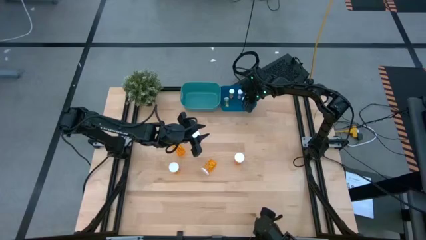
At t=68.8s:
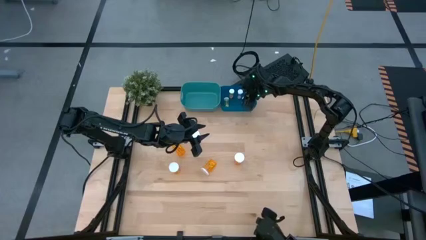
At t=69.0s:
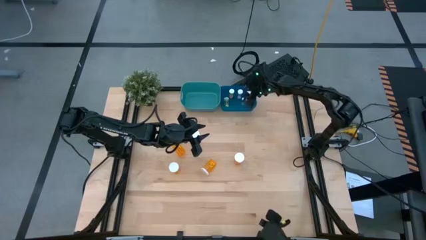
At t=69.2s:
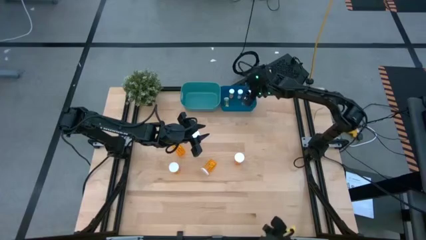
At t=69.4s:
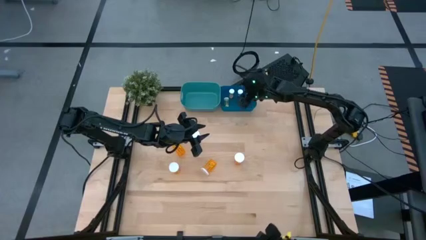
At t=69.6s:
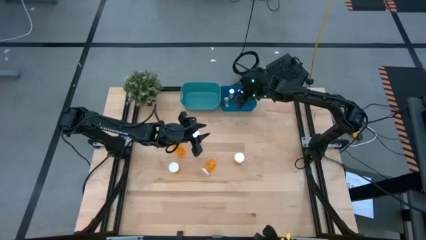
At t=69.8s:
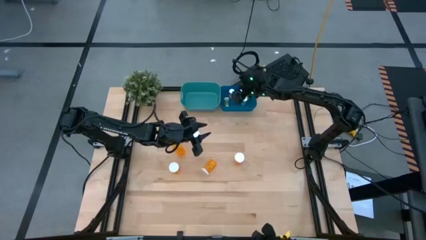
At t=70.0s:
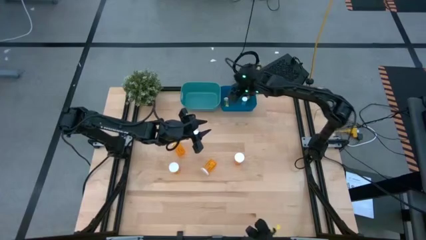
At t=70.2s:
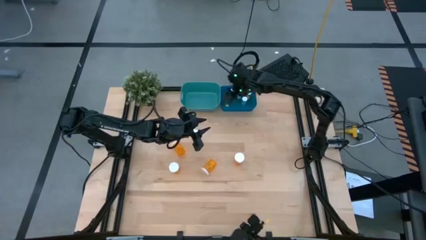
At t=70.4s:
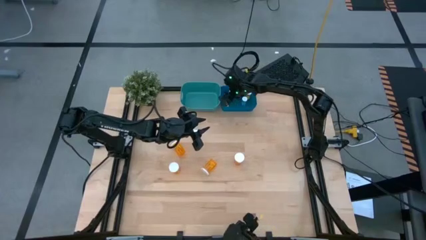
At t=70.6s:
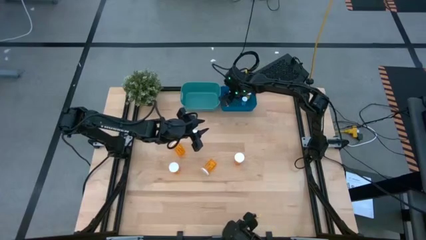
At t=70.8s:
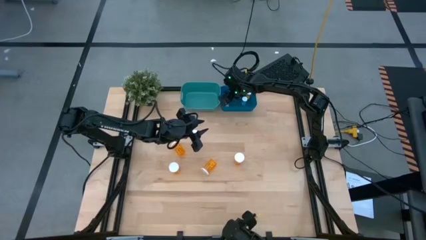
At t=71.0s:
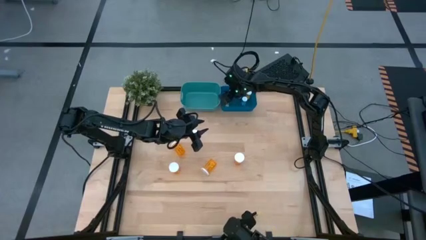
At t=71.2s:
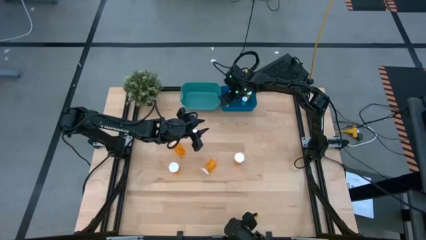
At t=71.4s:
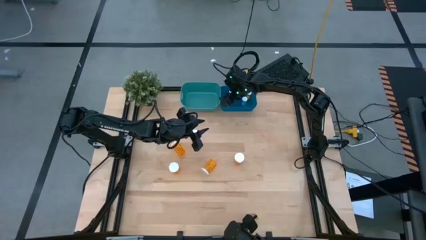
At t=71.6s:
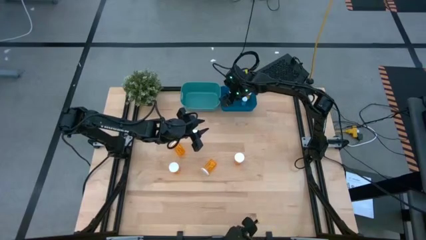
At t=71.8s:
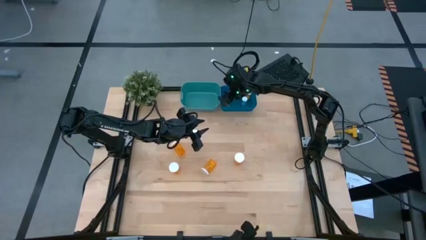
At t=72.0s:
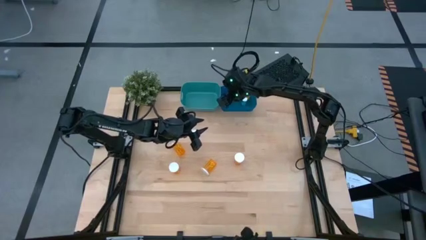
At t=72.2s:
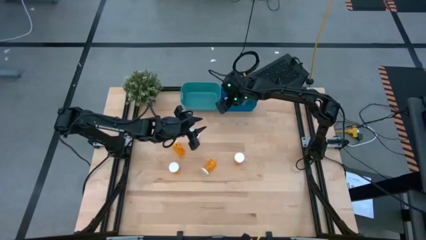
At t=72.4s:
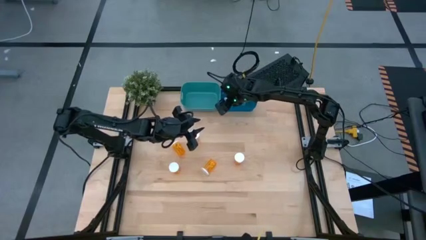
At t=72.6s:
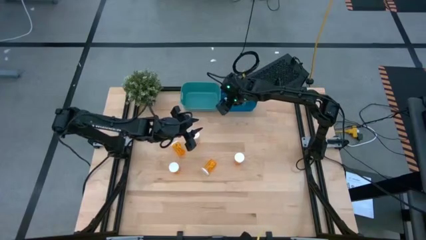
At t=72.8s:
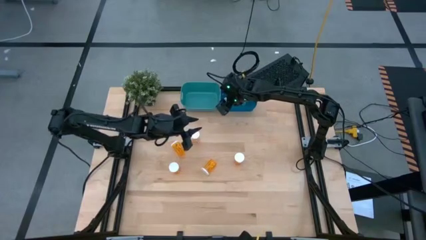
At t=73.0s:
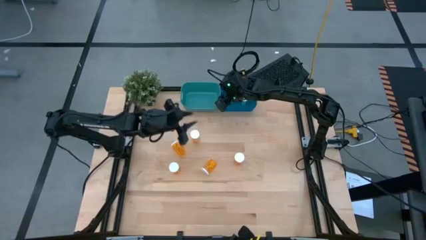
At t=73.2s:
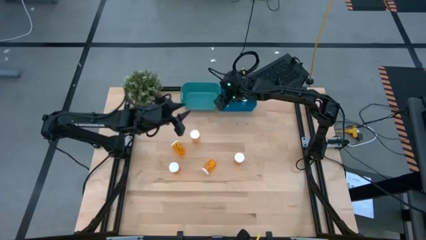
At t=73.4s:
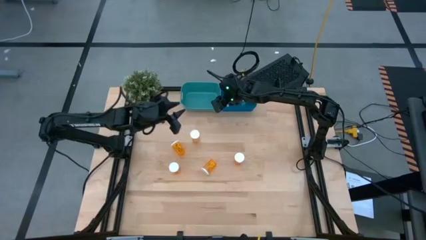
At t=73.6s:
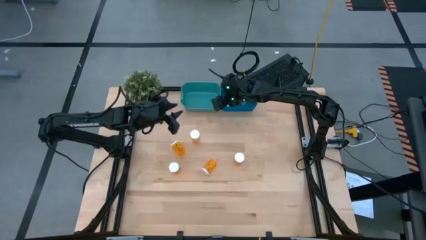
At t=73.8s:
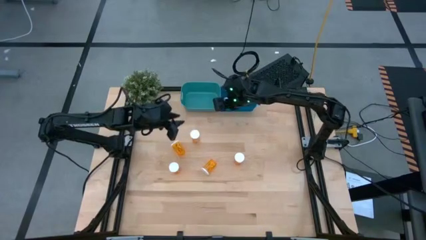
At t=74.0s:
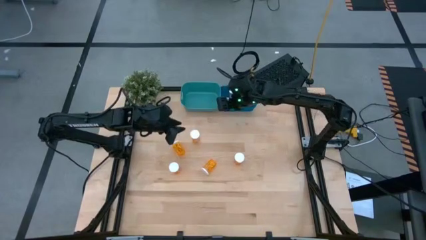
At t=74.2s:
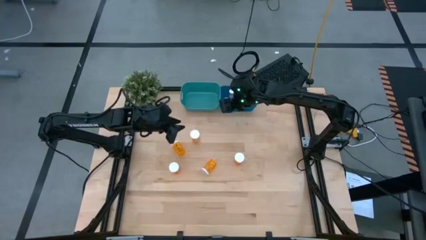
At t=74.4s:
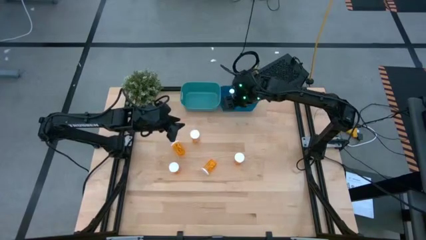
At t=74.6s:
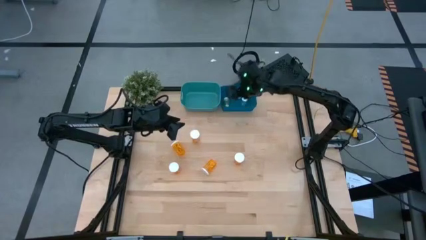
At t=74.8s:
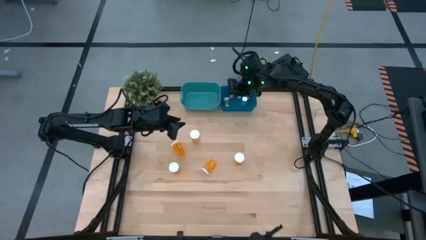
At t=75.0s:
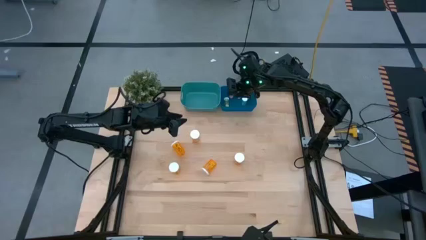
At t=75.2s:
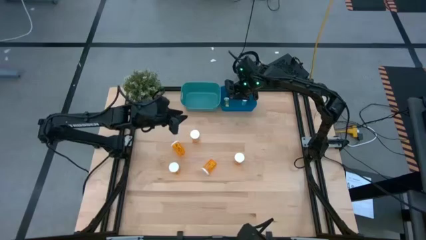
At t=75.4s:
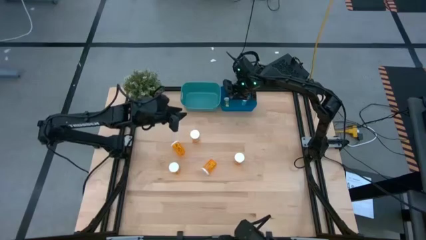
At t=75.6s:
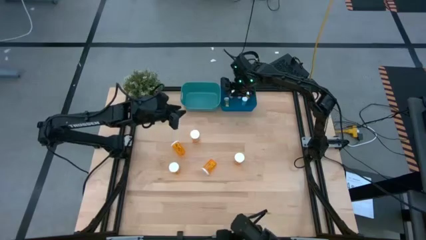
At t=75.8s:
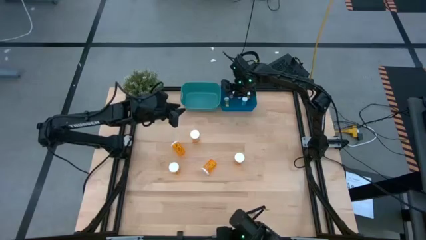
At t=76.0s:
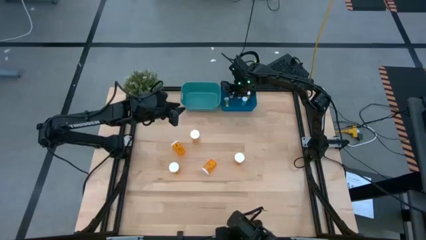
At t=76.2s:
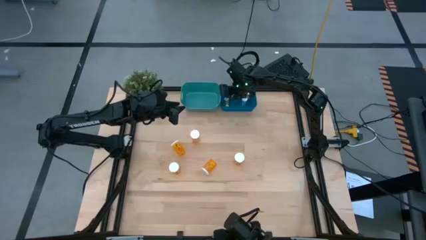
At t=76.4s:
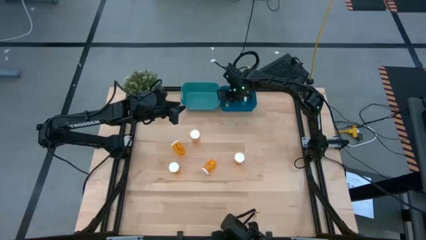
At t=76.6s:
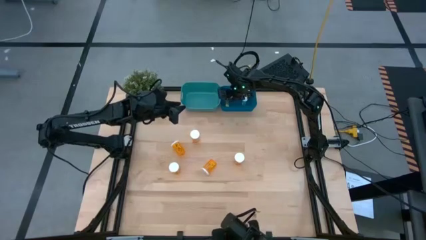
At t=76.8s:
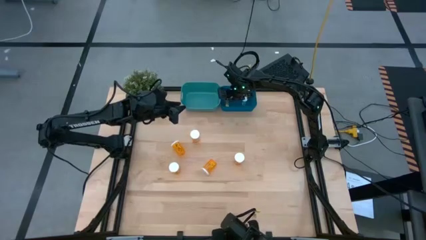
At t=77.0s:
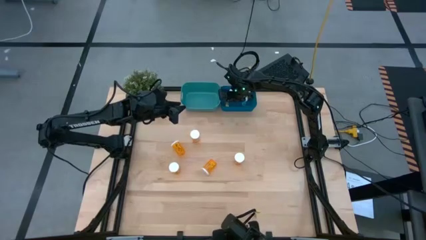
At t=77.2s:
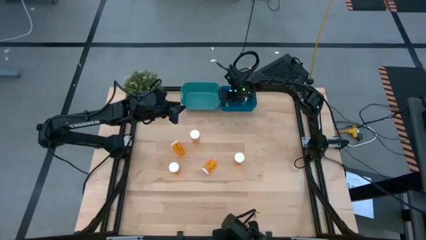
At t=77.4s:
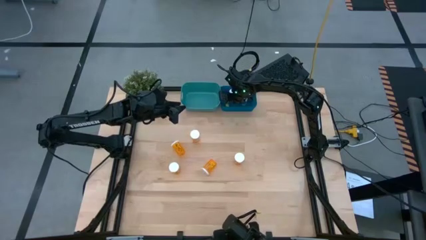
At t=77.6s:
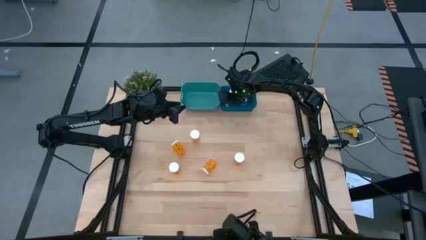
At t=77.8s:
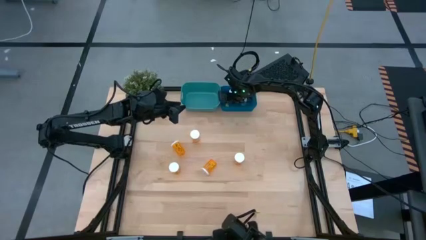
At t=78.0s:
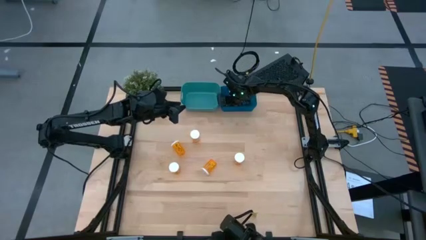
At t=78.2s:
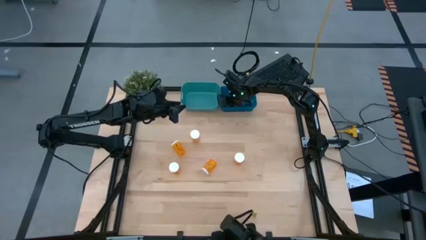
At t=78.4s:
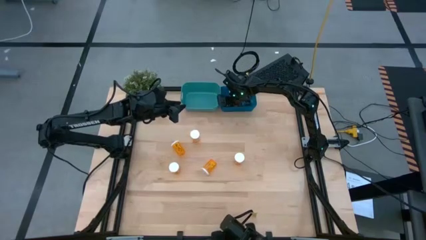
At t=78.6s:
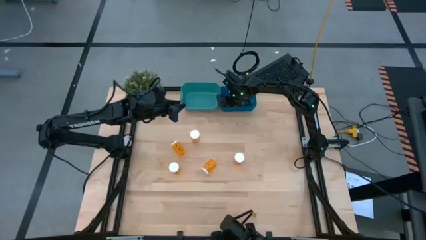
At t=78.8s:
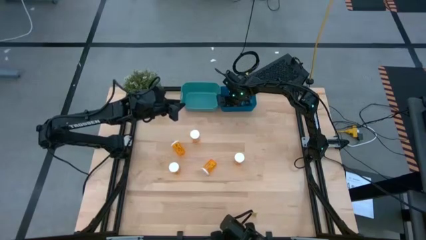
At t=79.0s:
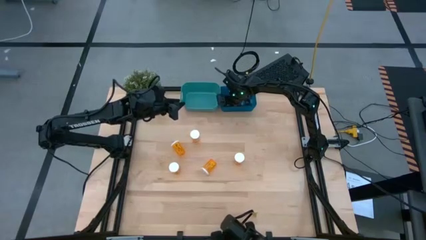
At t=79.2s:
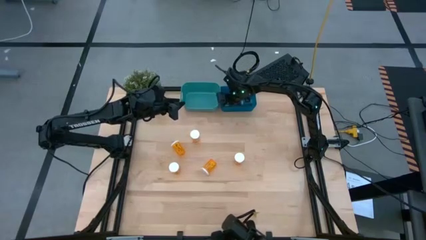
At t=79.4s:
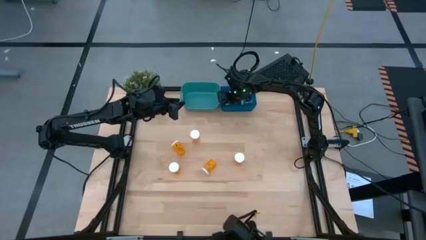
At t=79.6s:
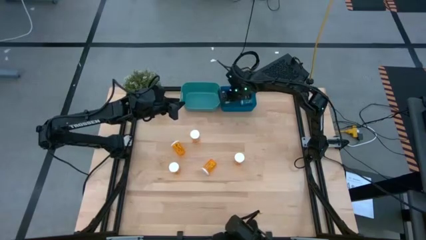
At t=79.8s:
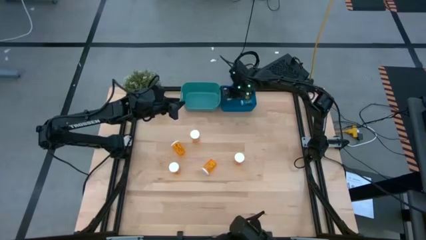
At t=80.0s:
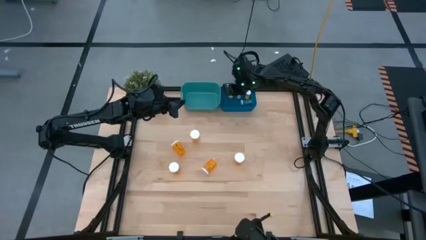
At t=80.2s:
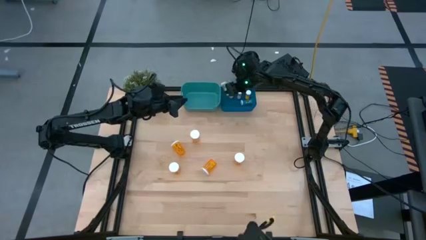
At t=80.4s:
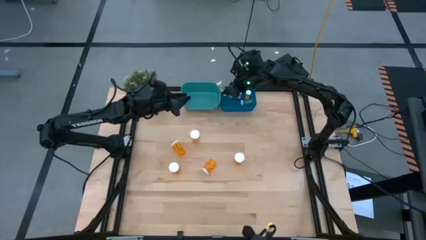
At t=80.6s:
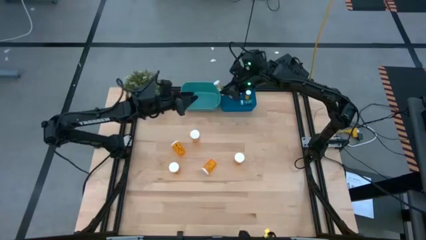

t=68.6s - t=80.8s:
Task: Pick and place medicine bottles into bin by pill shape (circle, oval)
Adjust the small yellow tablet bottle in the blue bin

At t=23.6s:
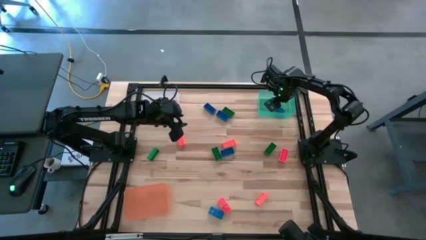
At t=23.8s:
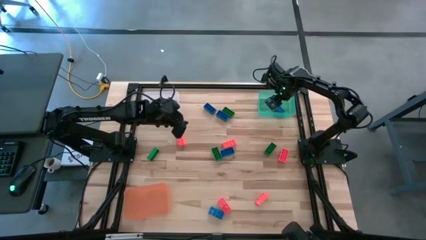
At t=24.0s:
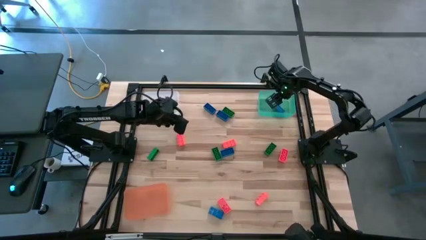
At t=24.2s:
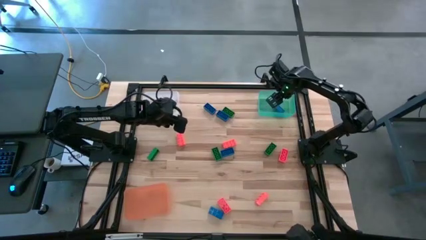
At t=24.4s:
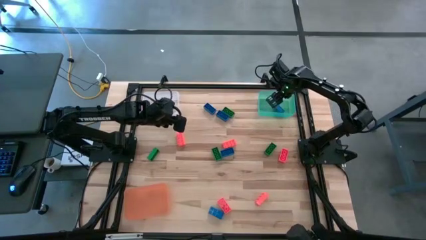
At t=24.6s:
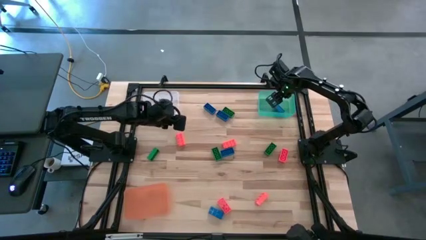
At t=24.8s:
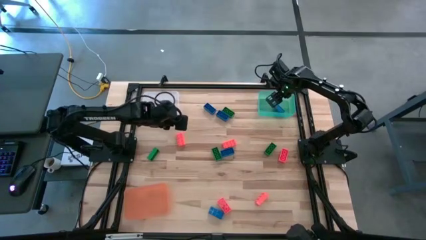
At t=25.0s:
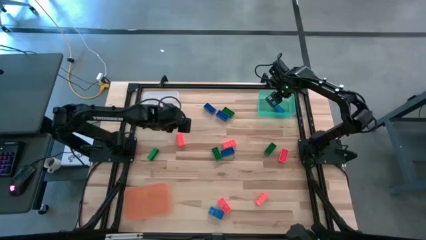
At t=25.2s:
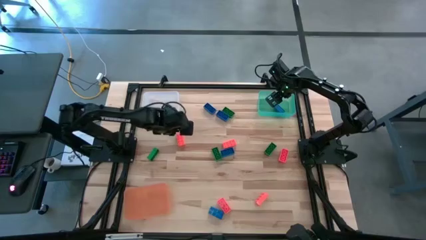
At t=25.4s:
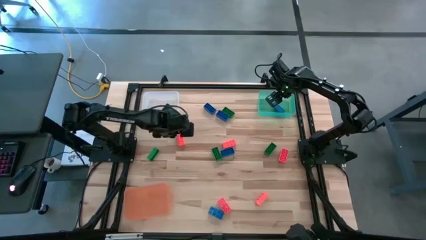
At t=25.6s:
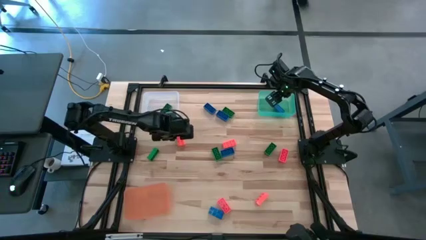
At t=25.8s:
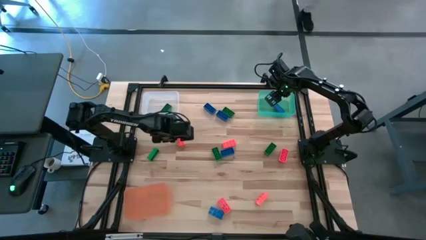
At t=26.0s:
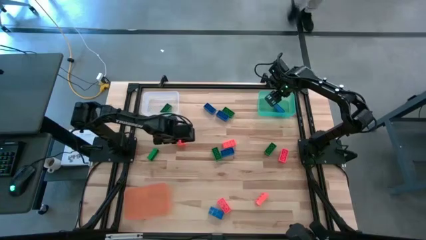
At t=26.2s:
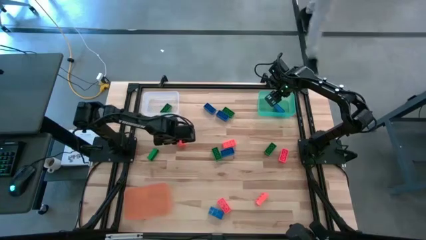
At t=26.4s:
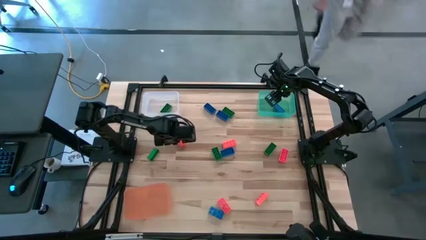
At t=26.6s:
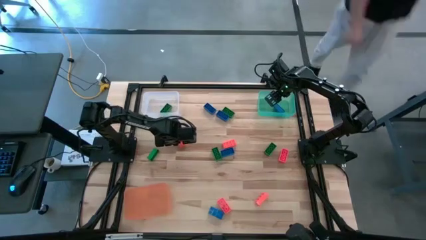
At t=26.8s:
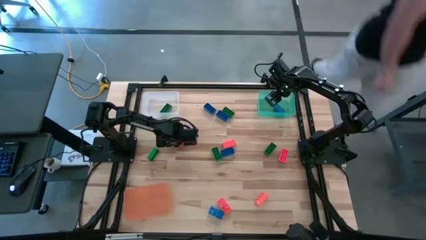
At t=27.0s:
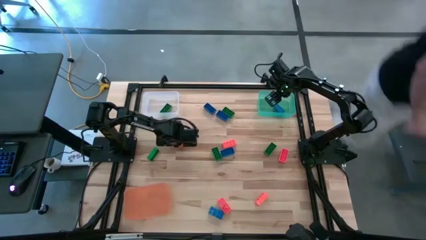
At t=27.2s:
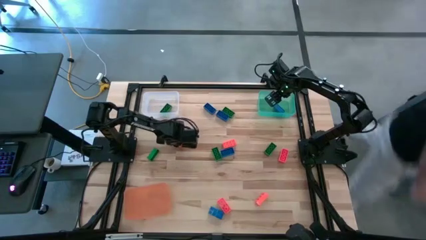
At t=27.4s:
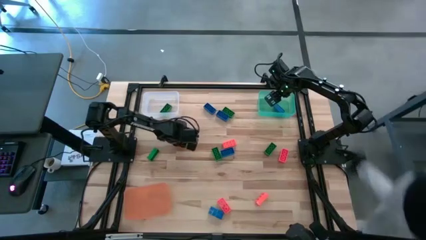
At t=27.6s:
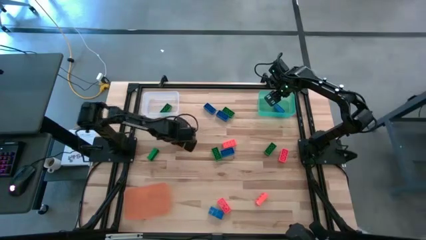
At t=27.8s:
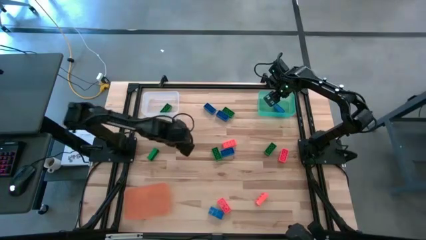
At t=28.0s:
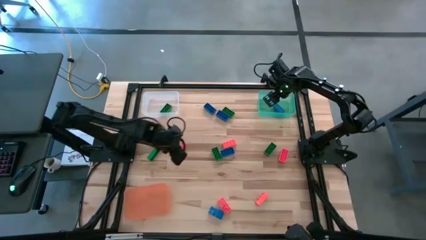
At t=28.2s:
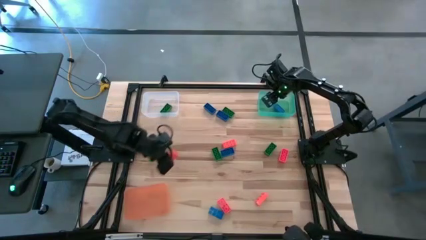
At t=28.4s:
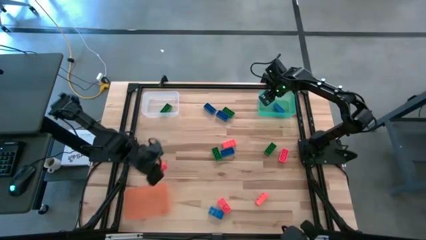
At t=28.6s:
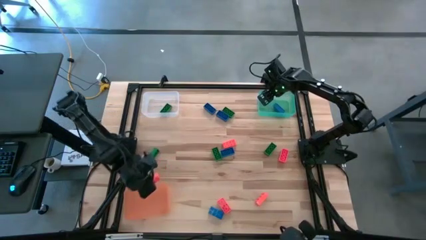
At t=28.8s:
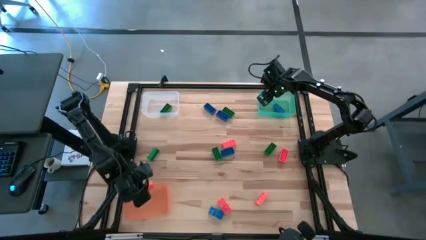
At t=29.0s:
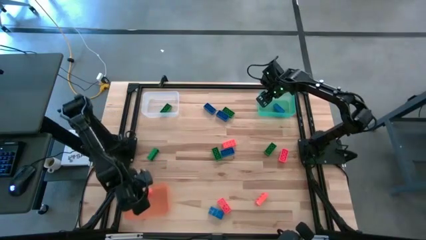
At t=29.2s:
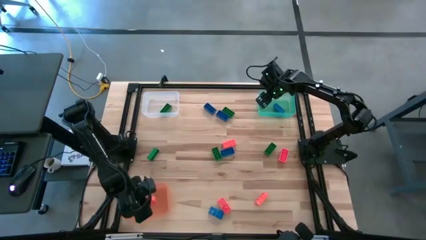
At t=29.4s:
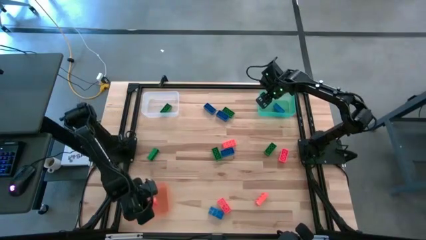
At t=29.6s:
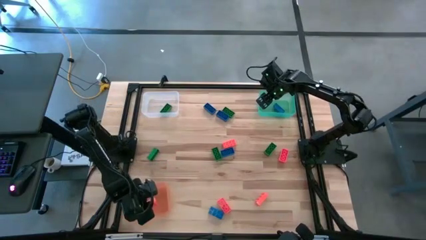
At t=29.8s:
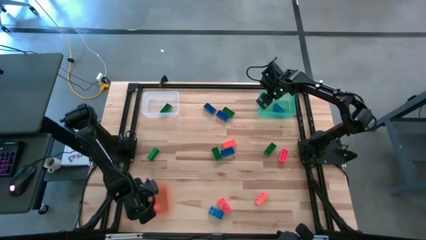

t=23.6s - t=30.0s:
Task: Sort & place blocks by color
Put the orange game piece into the orange bin
